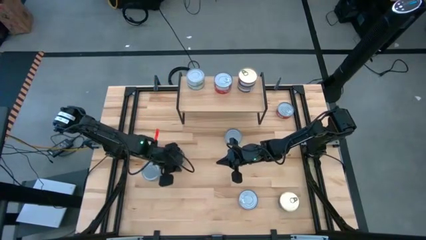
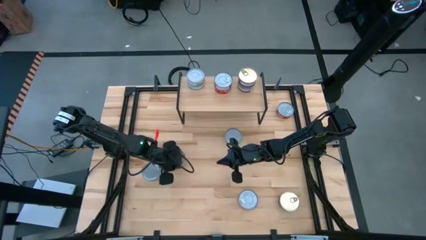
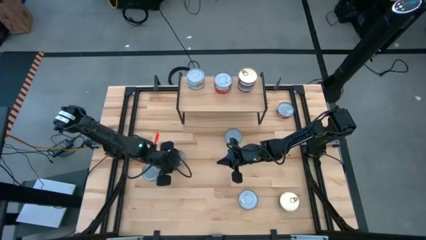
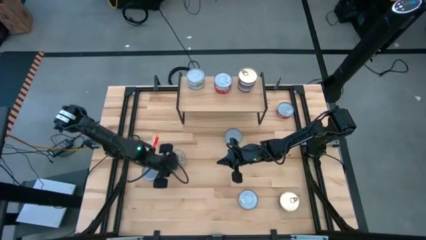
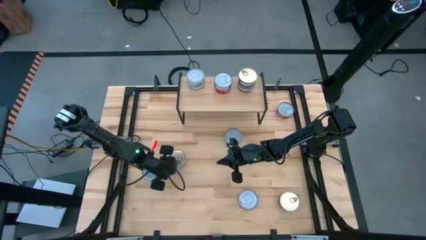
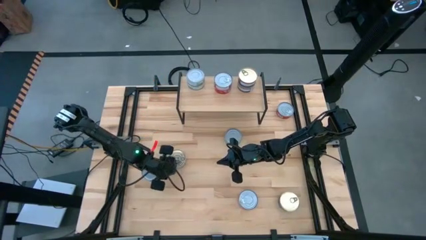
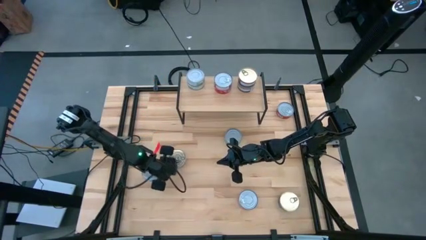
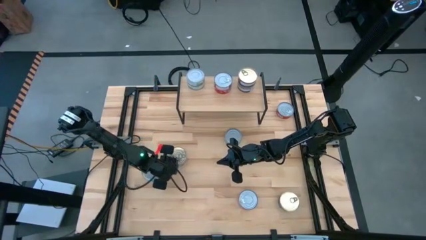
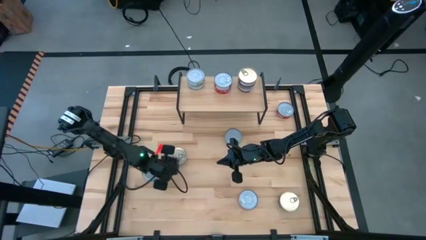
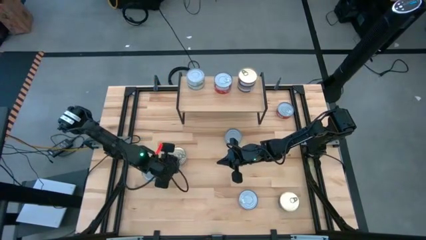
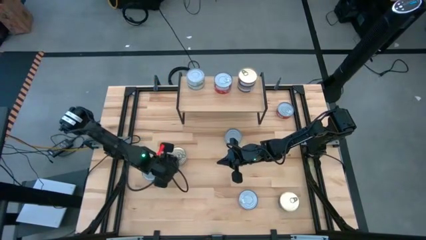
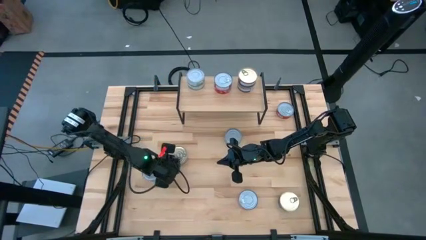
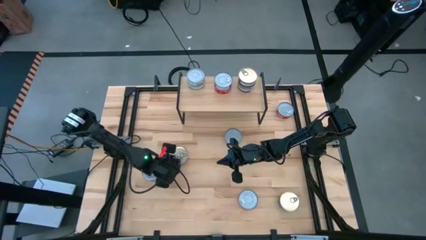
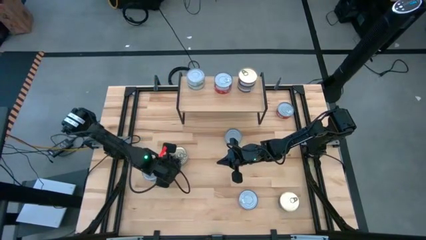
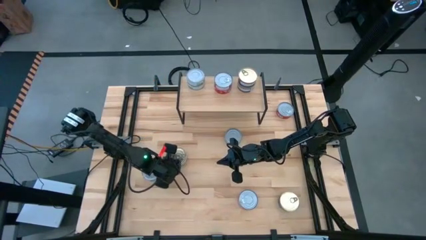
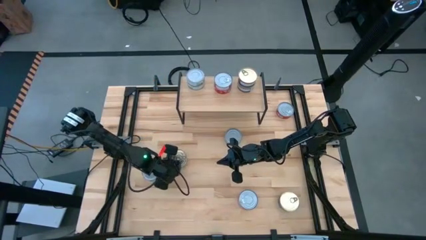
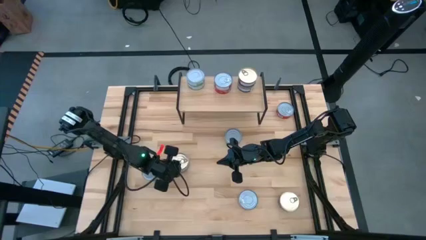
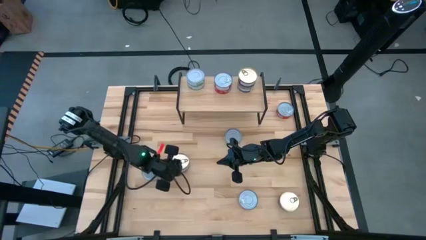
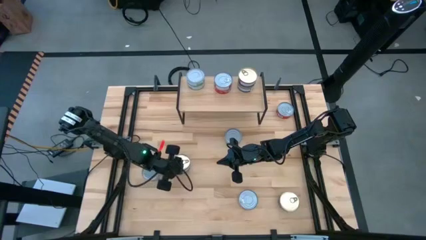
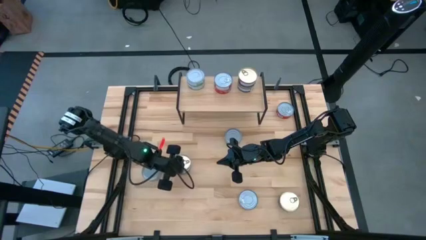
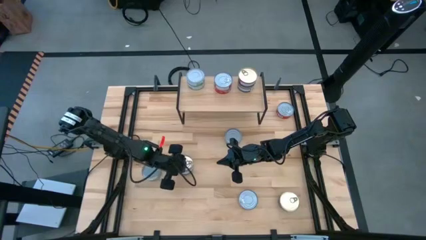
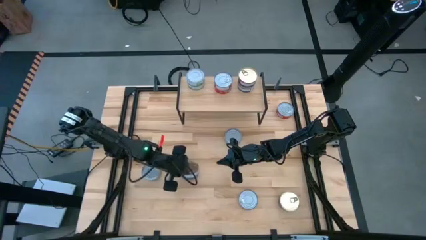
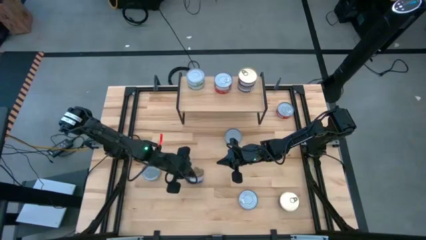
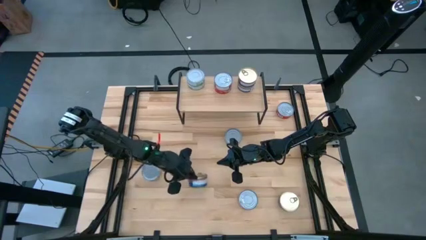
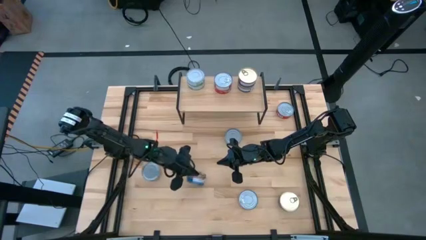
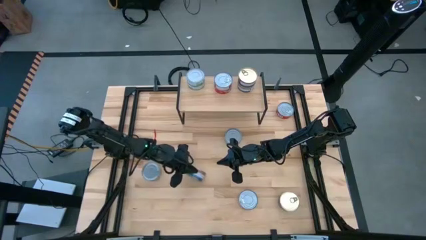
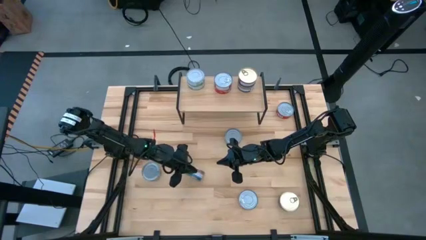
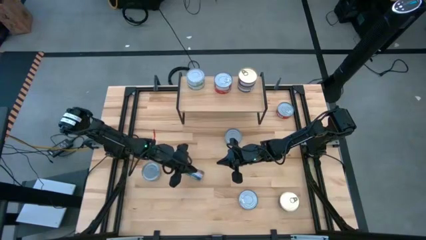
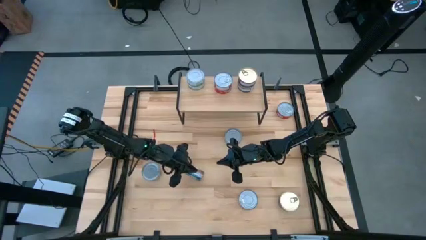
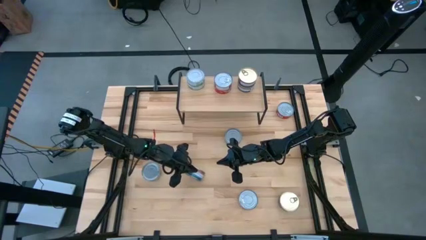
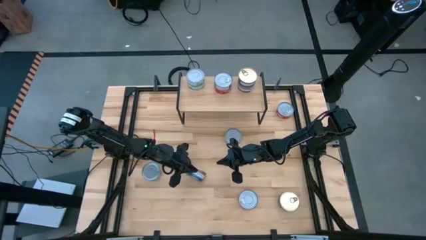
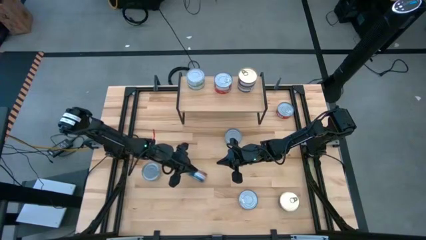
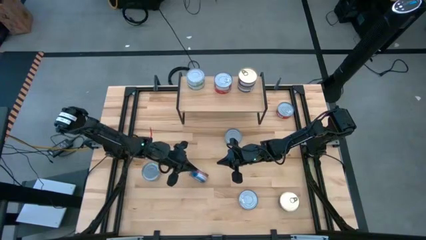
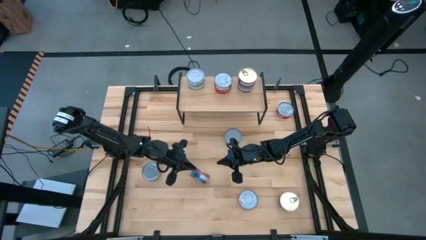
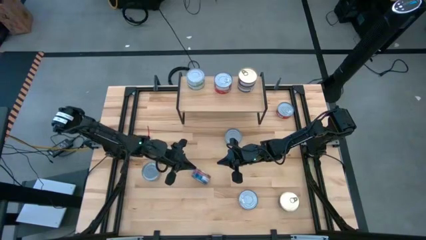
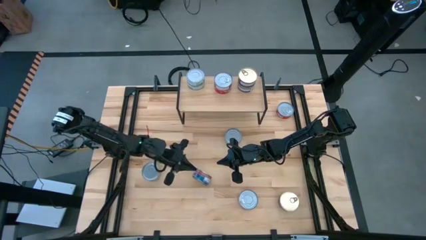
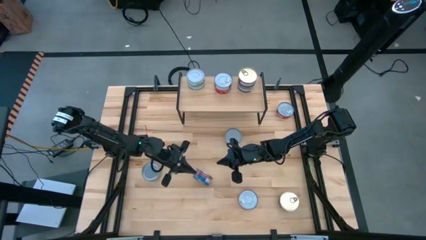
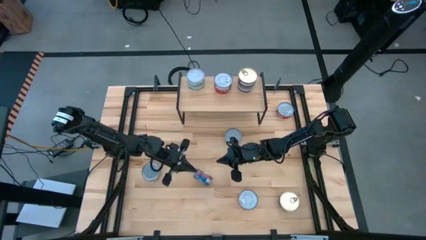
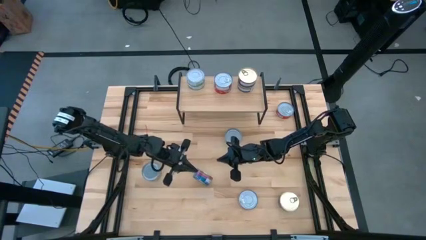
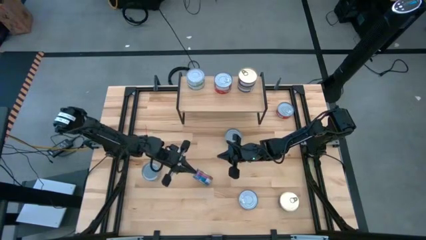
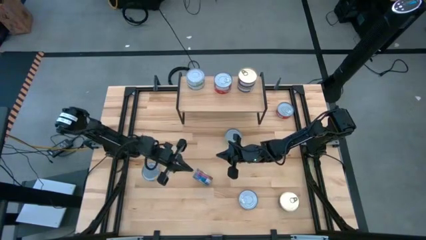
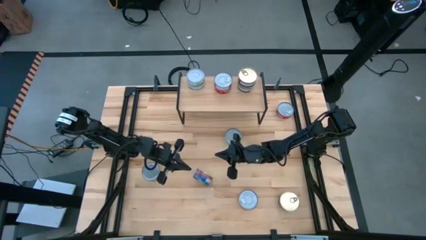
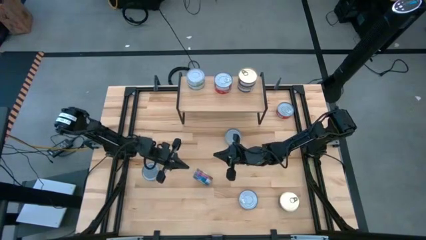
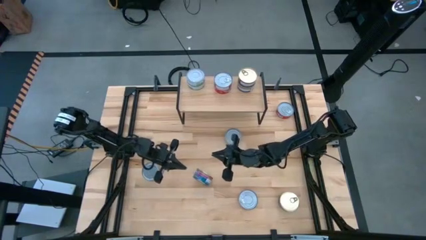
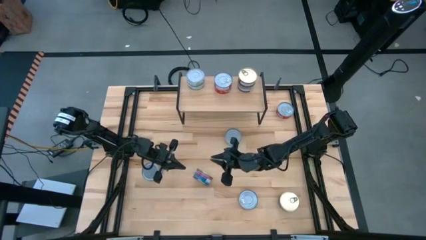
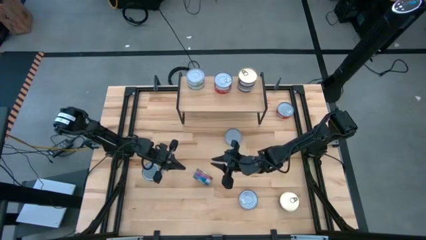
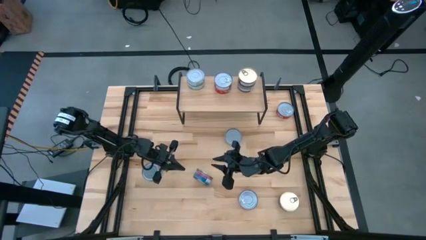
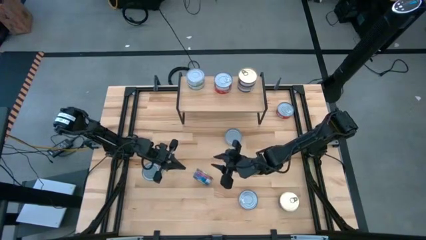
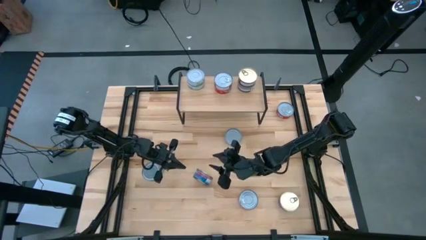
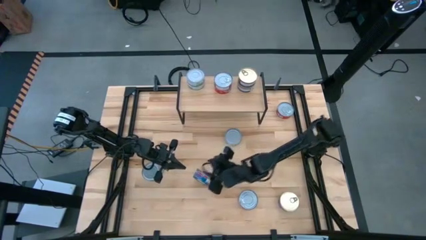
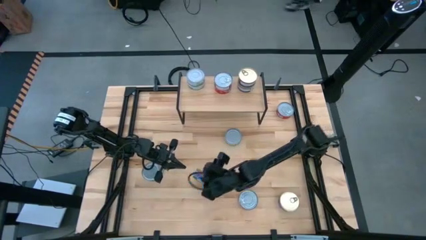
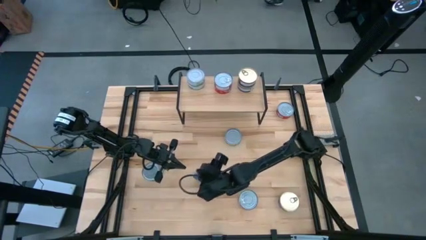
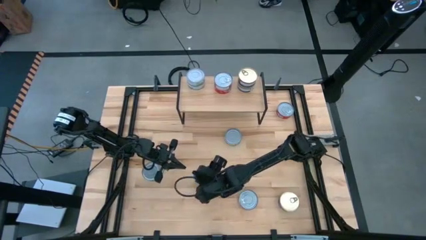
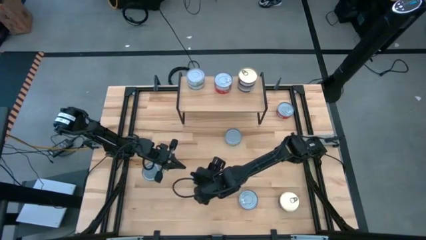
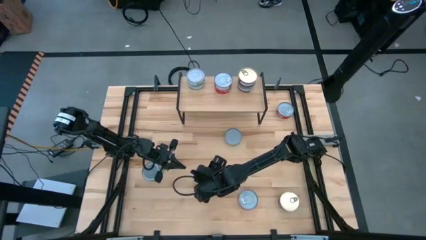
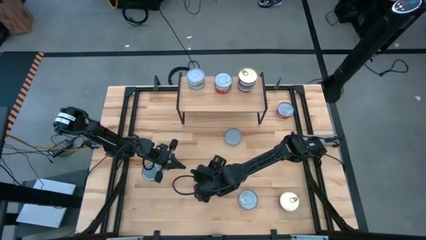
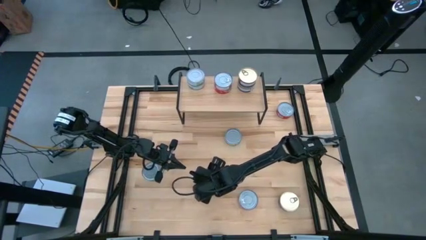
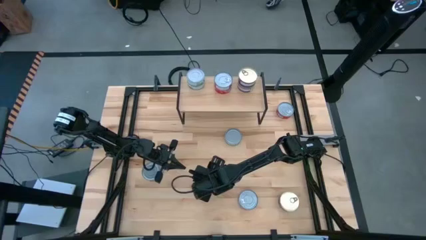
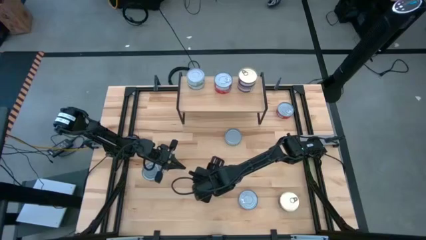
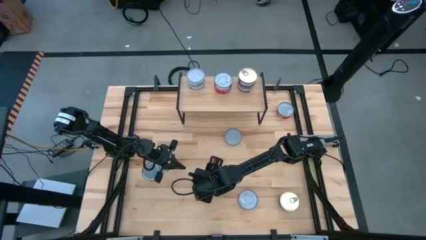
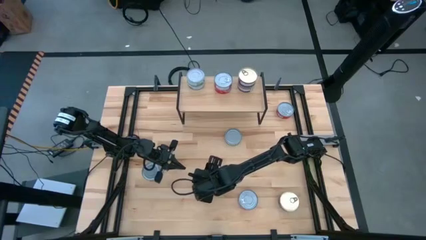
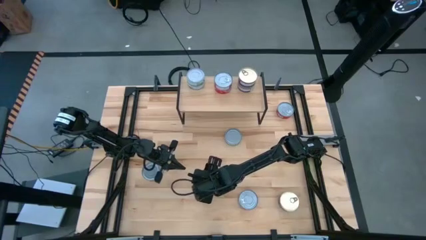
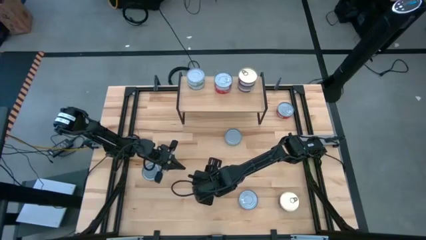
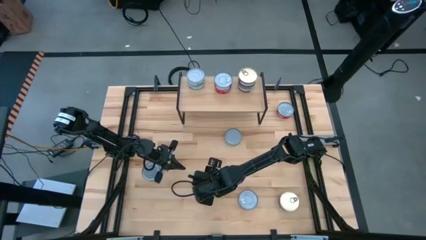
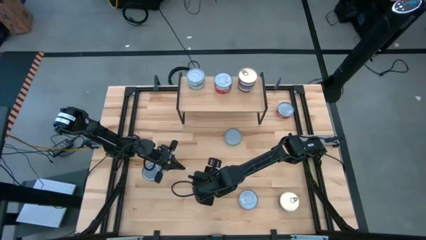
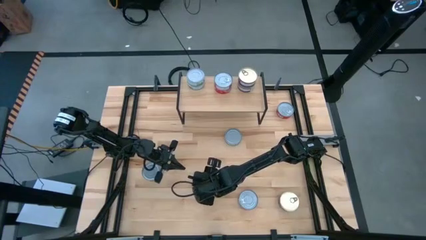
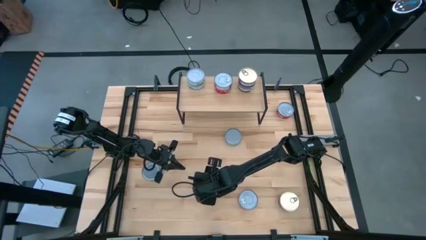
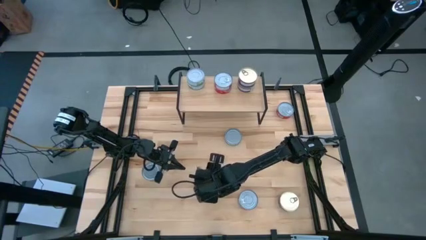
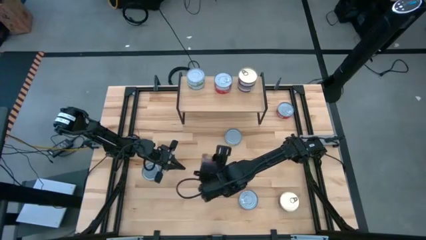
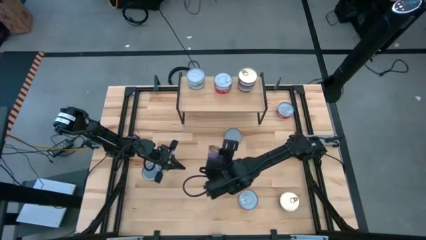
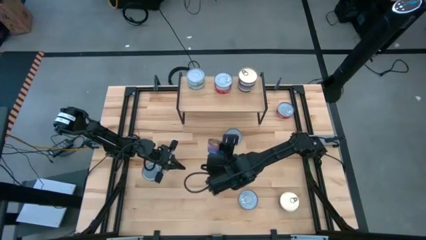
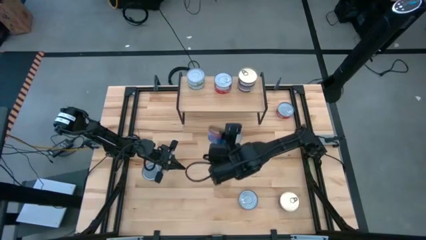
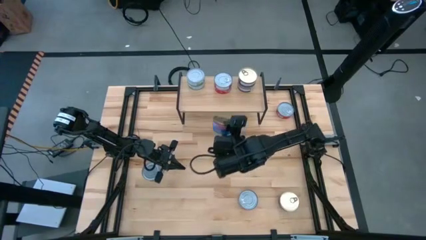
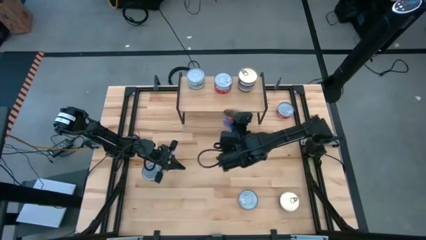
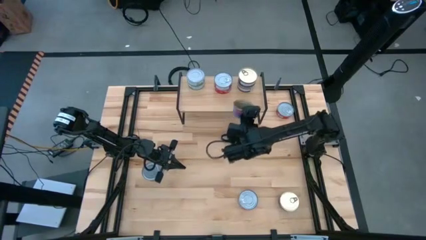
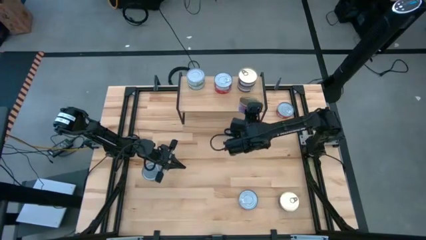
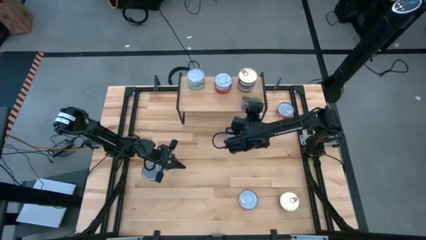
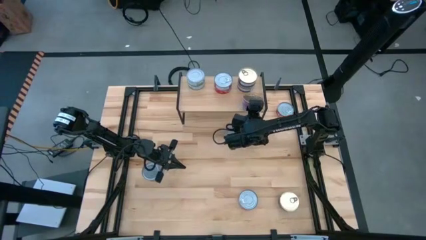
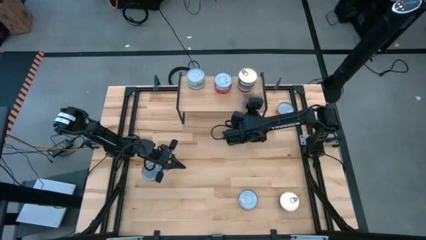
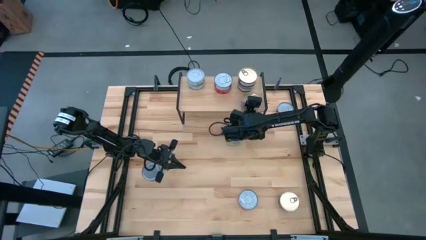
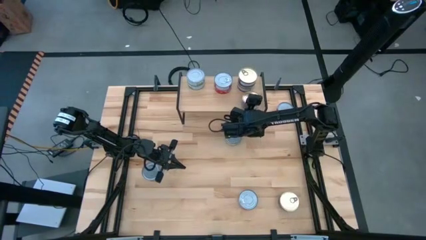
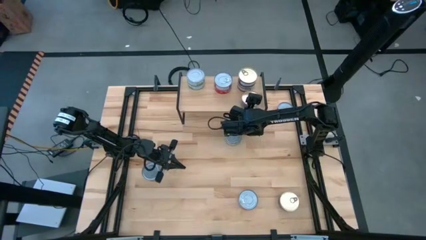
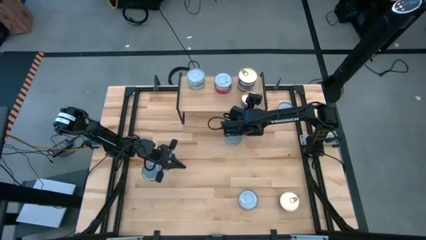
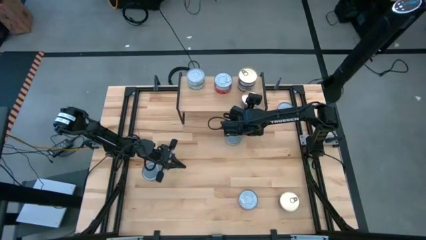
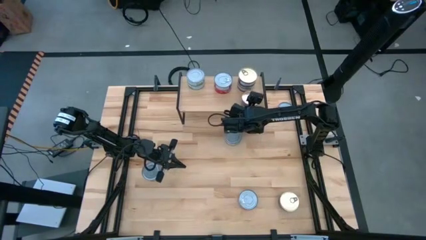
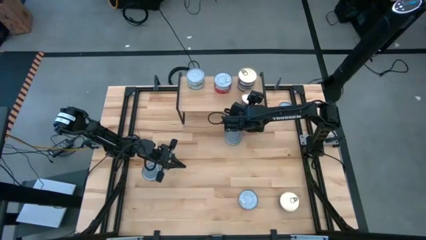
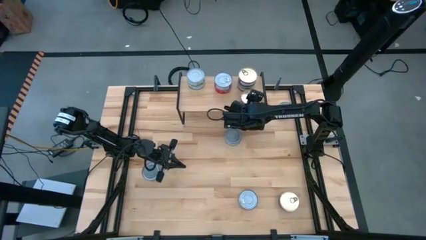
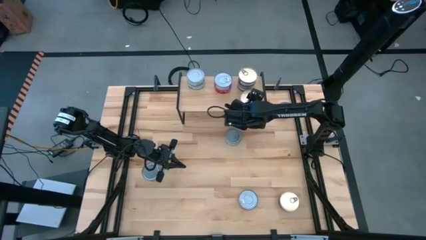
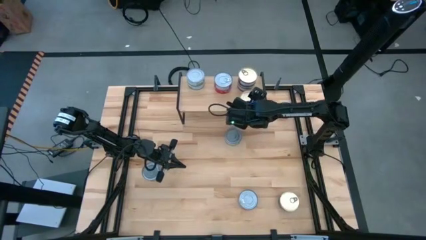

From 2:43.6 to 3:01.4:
Task: Stack canned seafood by type on shelf
Put the blue and pink tuna can on the shelf aligned with the blue and pink tuna cans
